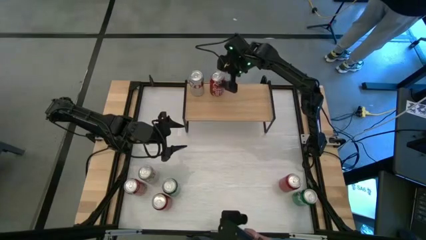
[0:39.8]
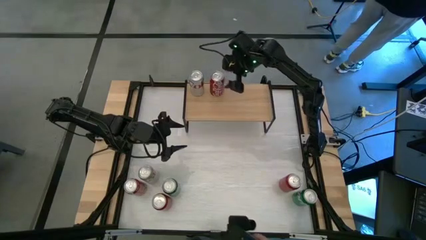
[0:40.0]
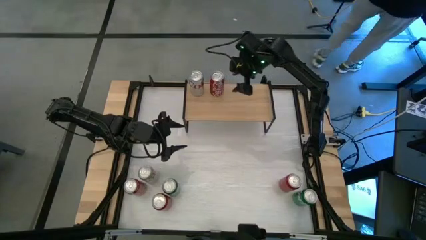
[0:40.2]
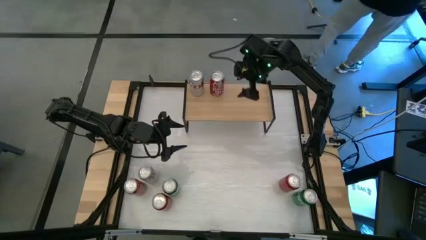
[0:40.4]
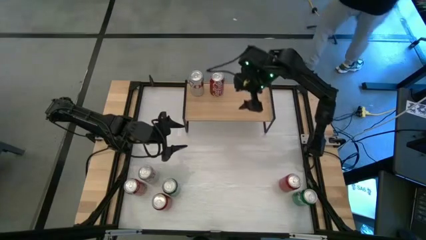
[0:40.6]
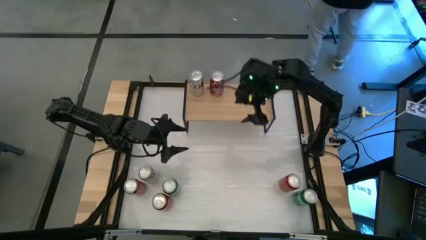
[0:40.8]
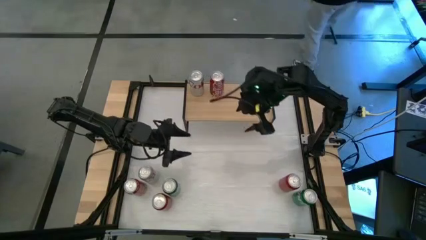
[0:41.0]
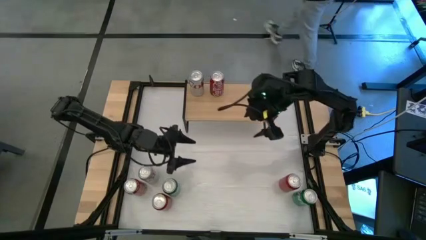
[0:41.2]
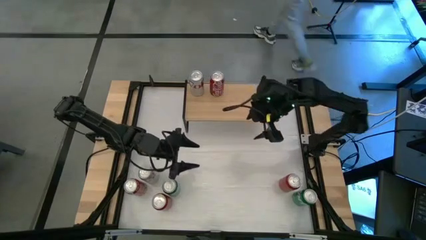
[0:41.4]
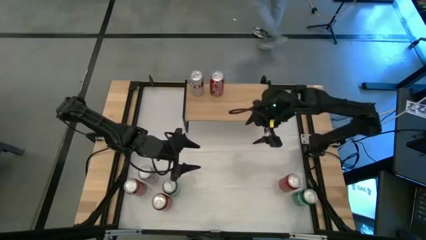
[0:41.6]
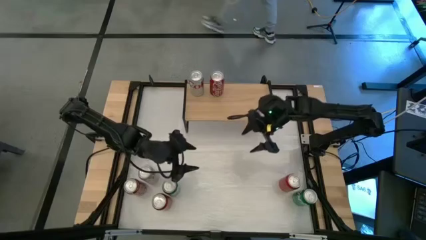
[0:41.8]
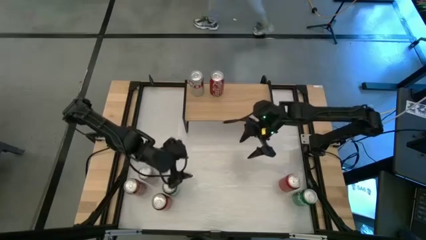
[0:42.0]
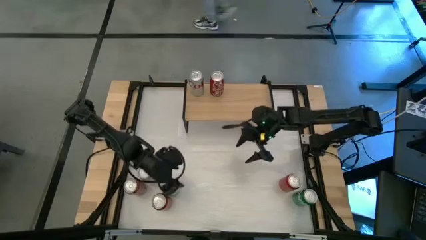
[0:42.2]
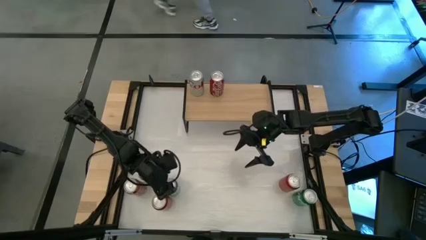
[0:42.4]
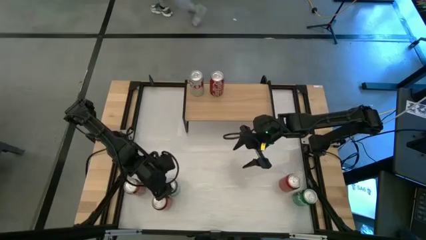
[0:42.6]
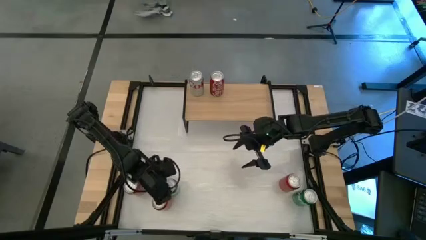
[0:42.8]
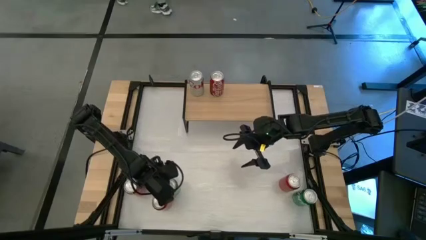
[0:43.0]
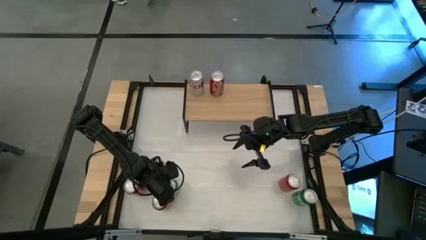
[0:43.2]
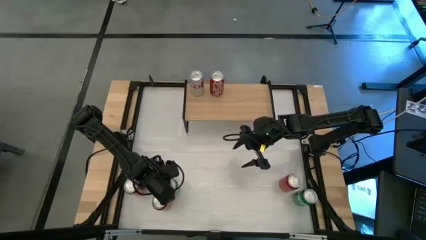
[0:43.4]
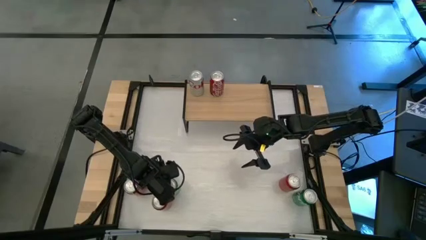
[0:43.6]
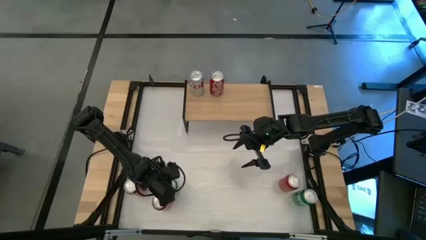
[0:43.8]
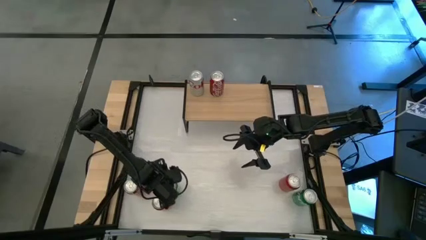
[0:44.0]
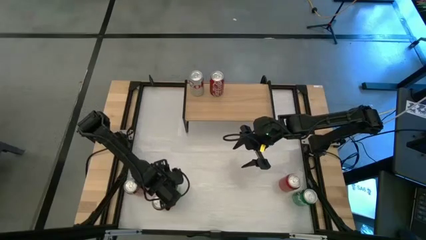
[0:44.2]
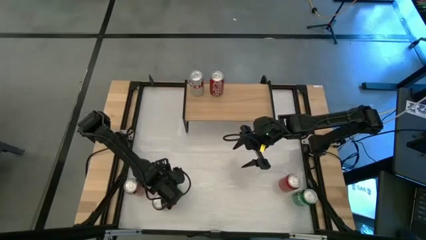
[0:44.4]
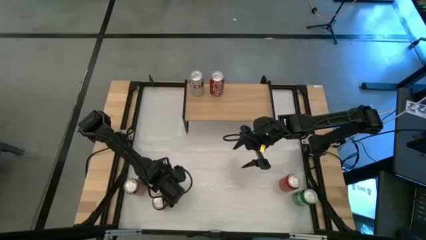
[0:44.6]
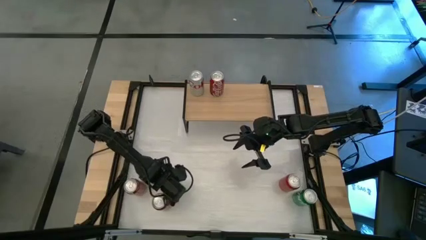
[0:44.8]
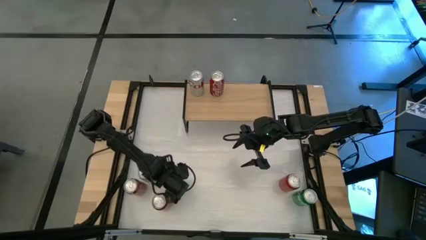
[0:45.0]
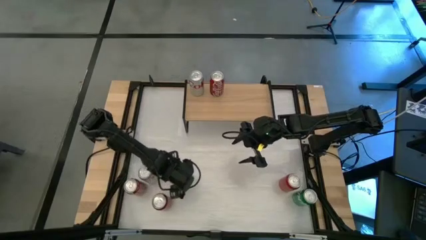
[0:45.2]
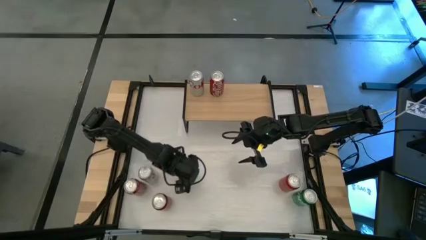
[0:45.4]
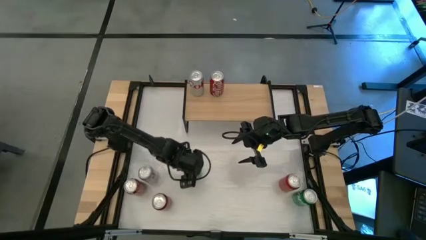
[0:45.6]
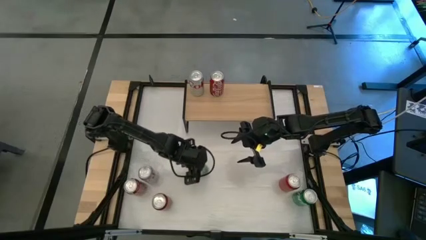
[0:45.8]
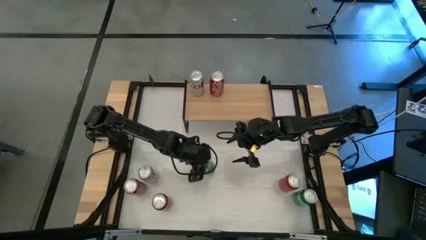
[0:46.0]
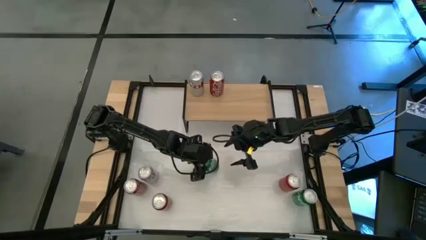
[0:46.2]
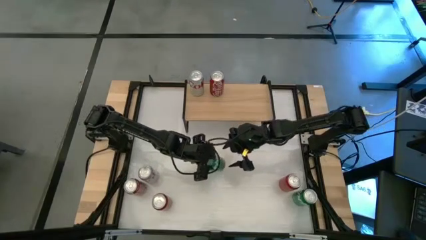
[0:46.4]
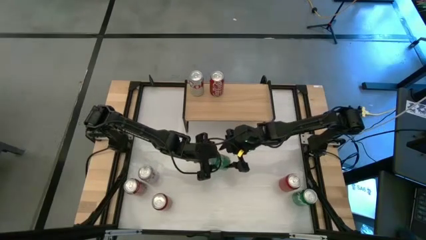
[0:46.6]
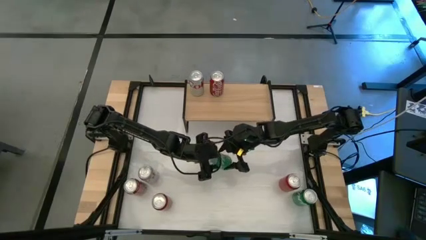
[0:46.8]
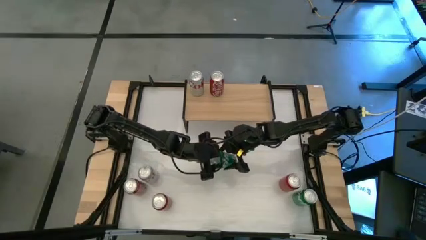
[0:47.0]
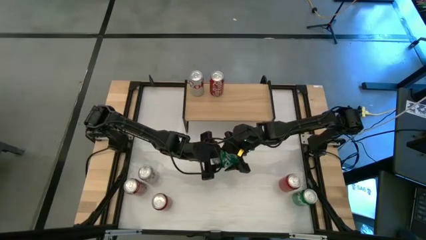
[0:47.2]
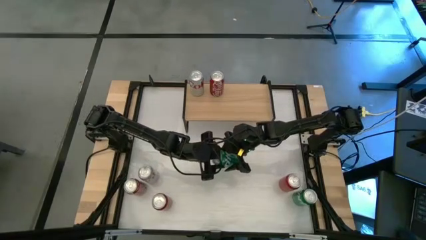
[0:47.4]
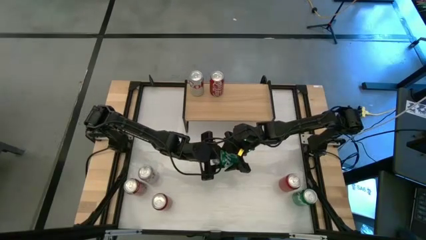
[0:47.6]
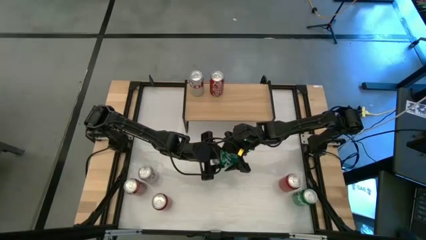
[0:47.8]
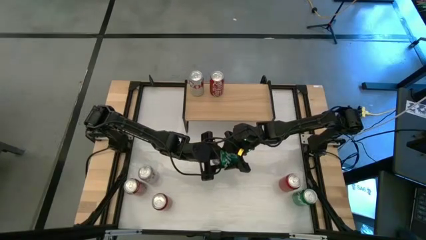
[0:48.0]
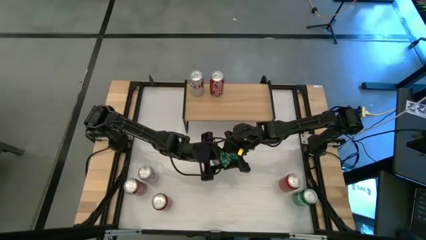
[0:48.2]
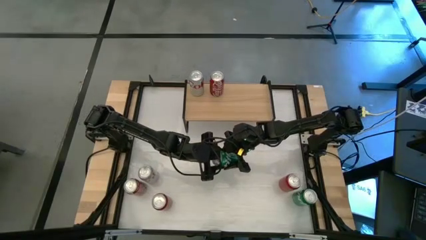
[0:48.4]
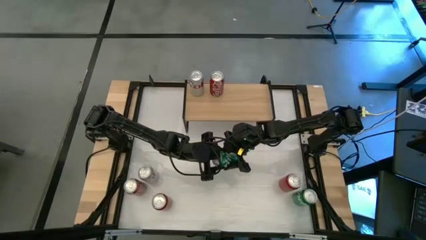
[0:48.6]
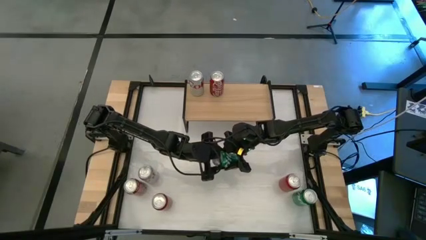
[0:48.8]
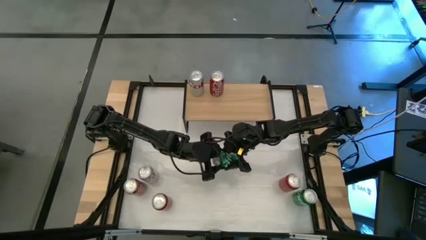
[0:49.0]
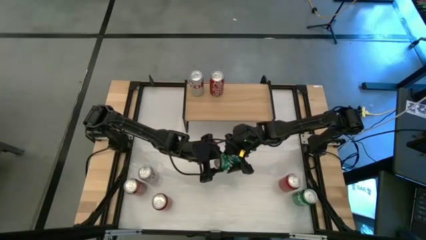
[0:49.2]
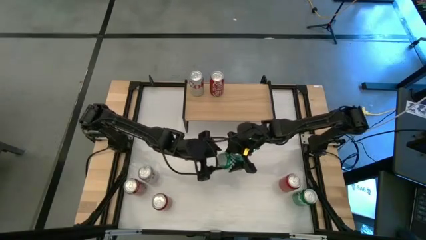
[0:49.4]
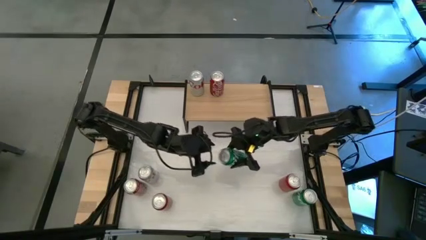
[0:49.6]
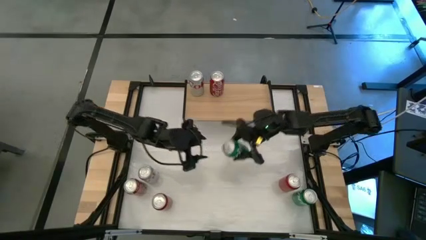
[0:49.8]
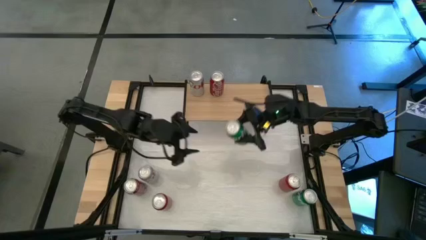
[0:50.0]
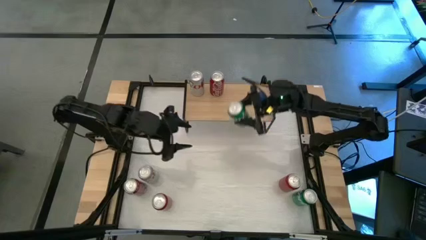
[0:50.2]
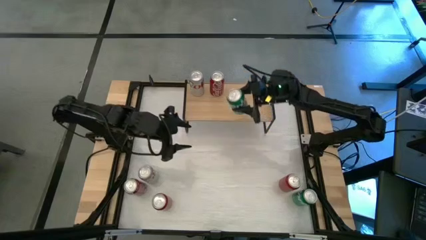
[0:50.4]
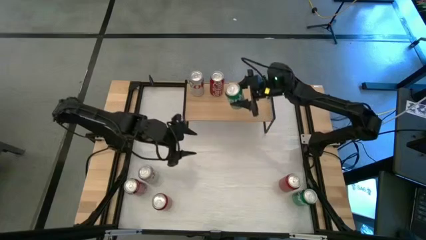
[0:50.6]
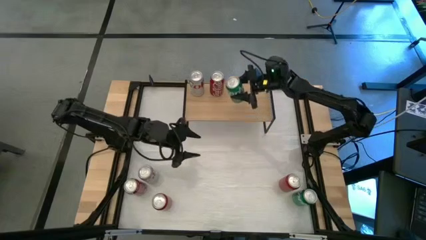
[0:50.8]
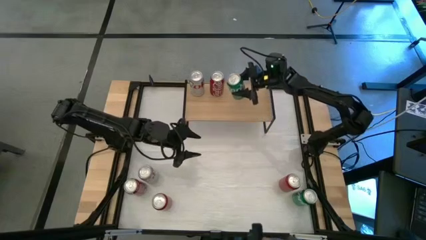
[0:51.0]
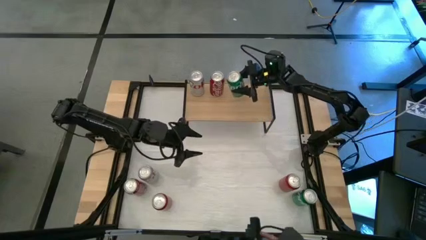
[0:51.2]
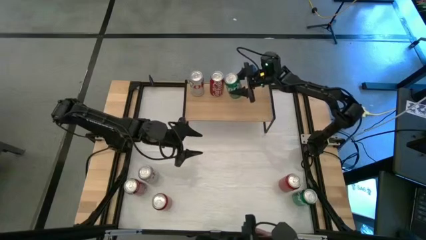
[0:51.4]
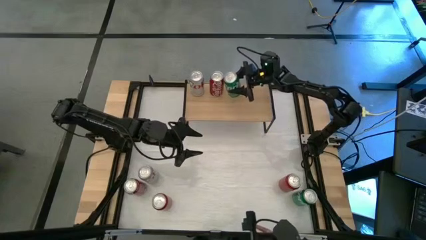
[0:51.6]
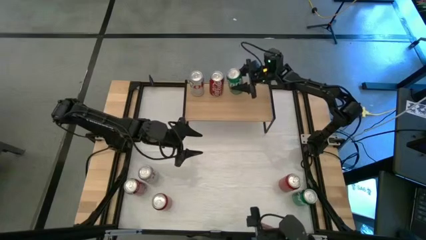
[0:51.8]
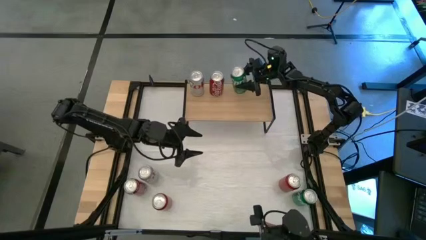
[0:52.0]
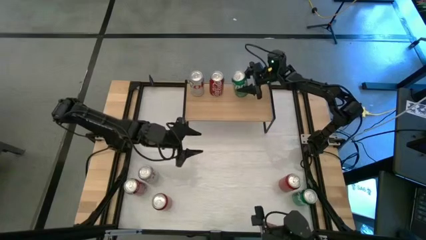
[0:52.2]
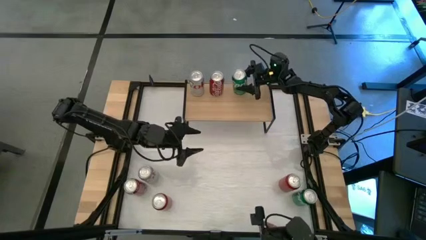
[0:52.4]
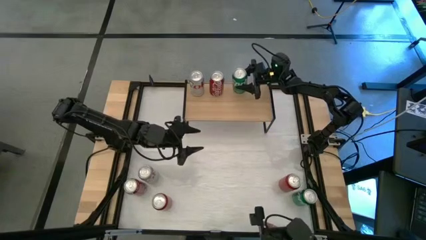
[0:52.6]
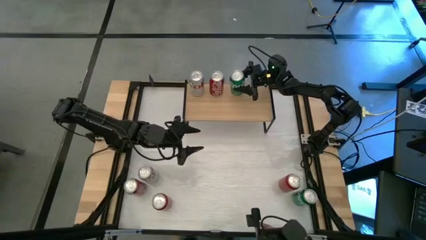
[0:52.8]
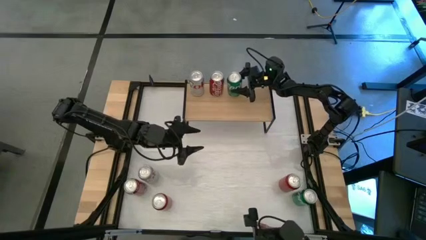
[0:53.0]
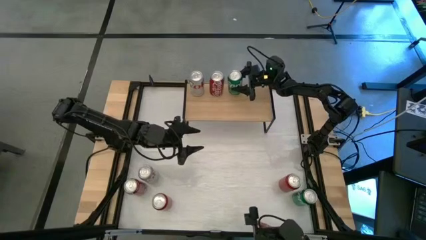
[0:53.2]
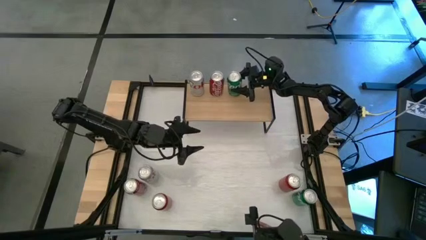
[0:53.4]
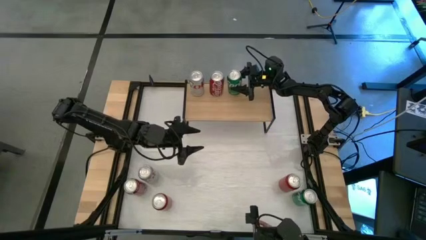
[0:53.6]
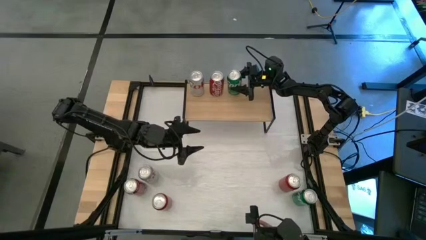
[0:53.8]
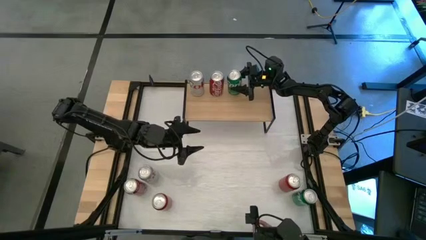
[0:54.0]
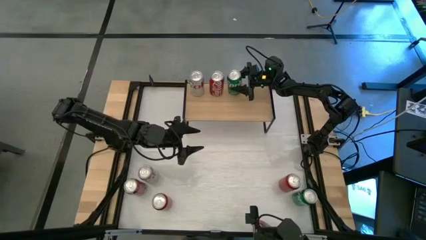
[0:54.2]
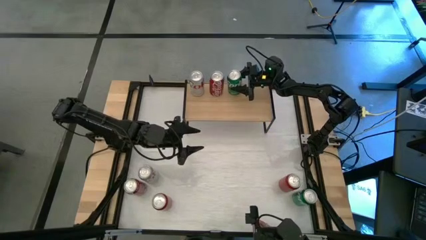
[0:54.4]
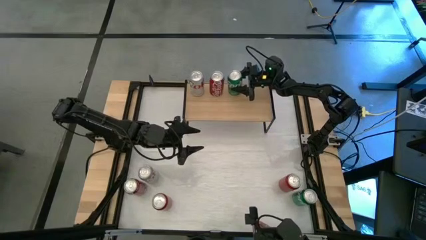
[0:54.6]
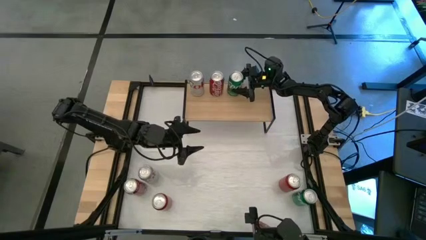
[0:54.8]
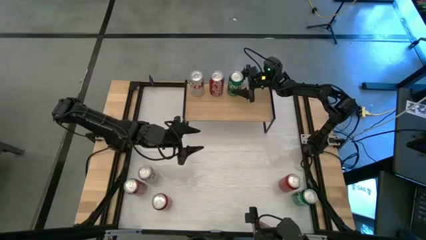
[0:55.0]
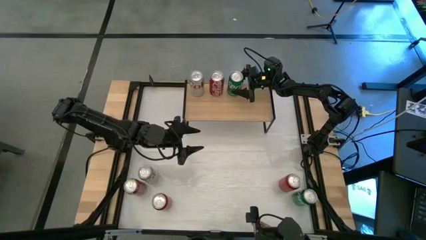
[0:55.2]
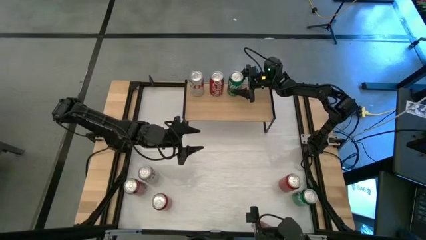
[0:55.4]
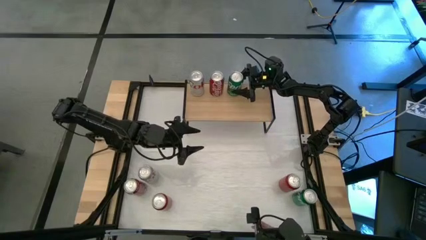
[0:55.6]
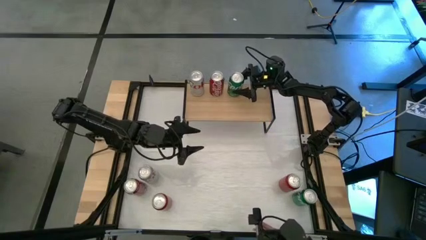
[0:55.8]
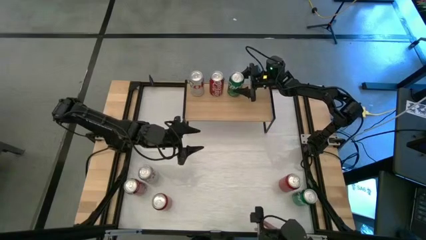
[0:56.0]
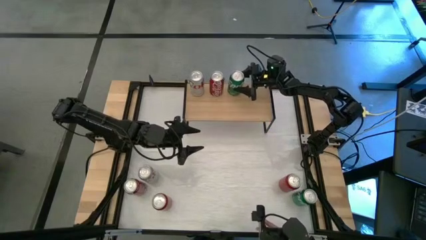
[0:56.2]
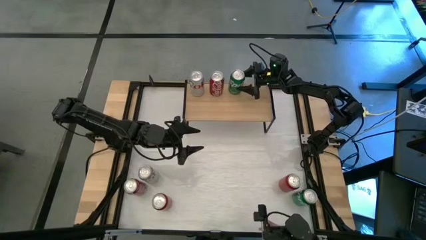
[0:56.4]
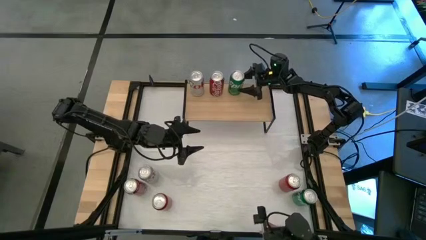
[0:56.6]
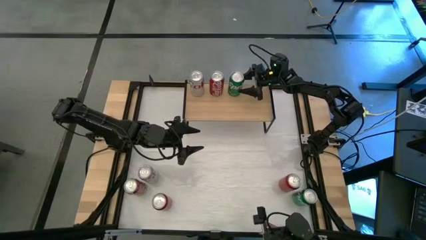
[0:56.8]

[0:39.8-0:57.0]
Task: Place canned beverage on shelf
Put the left green soda can on the shelf
